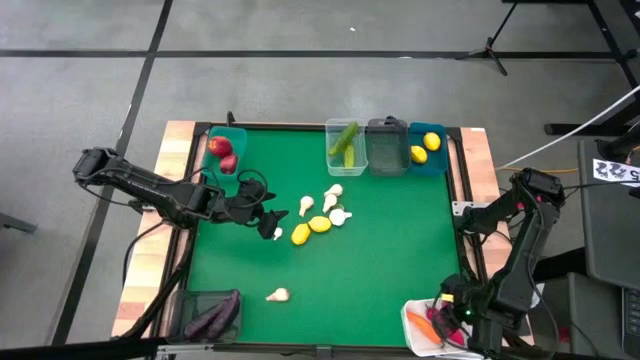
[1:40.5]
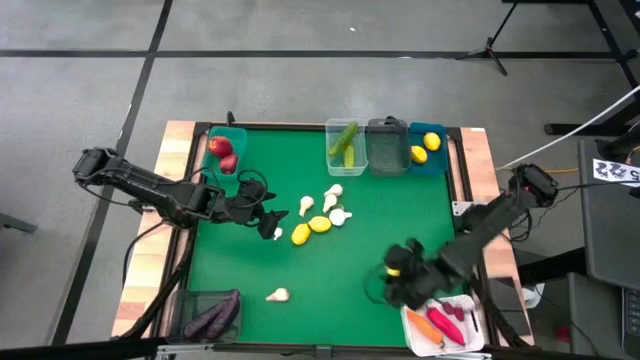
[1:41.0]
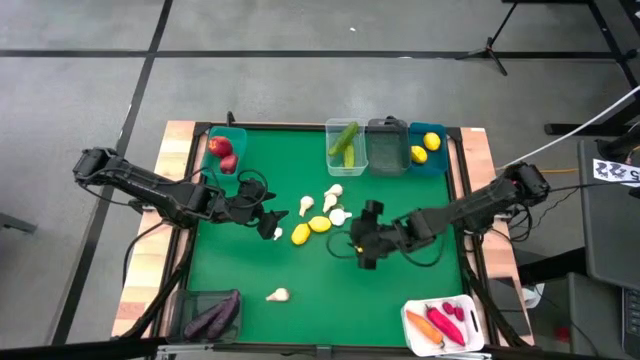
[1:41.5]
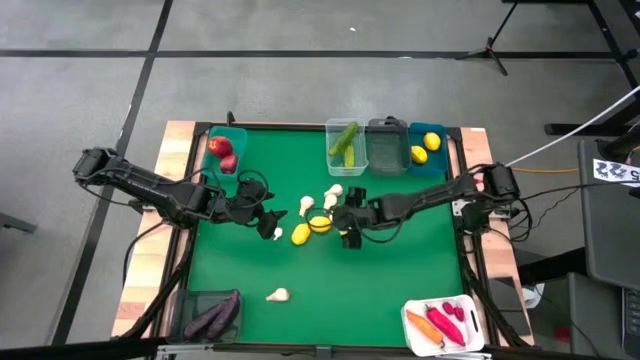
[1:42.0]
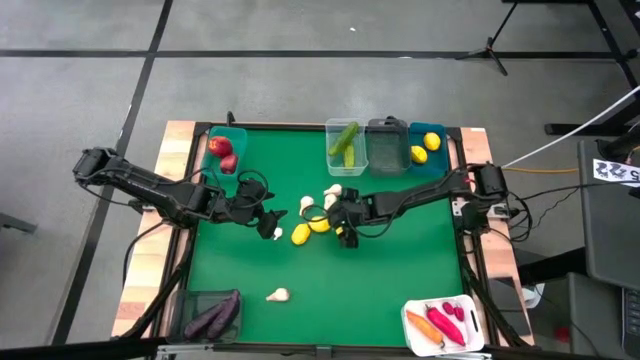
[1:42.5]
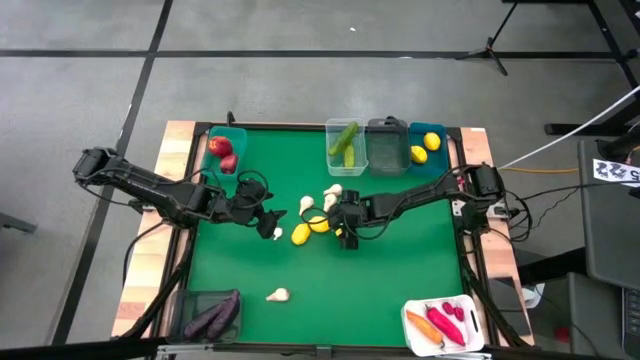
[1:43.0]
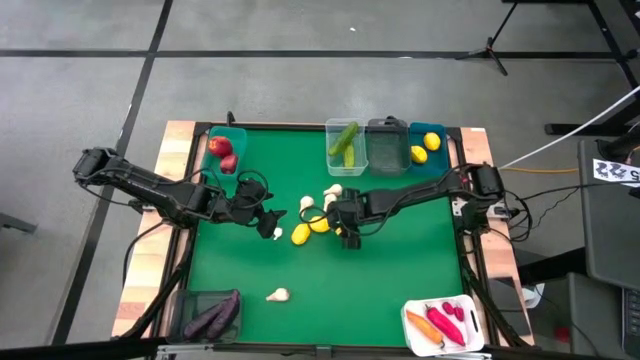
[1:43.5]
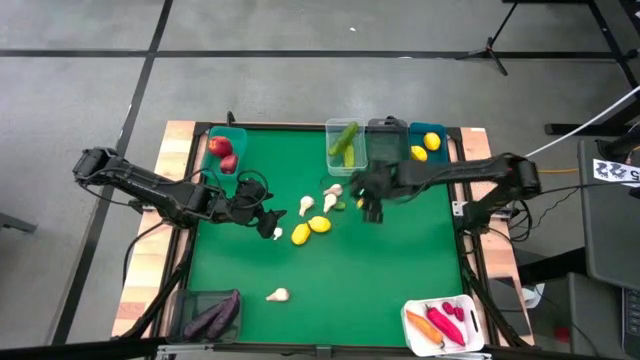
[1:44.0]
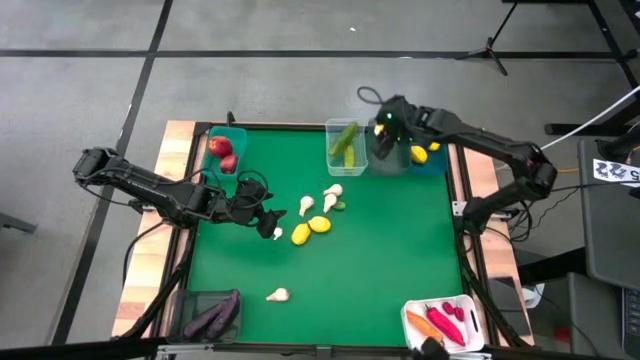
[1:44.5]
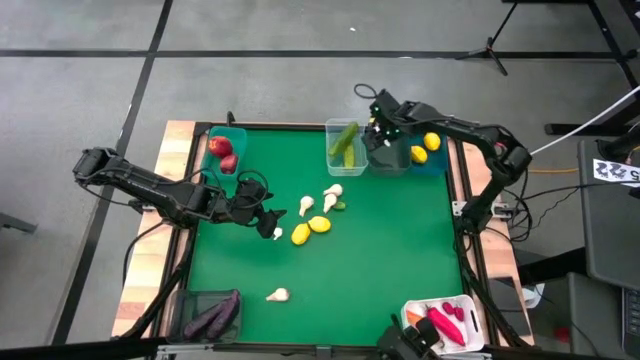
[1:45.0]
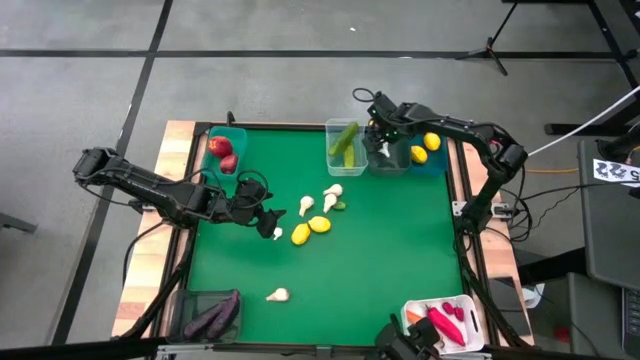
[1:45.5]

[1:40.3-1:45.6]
Task: Sort produce into baskets
Put the white garlic into the top black transparent bin

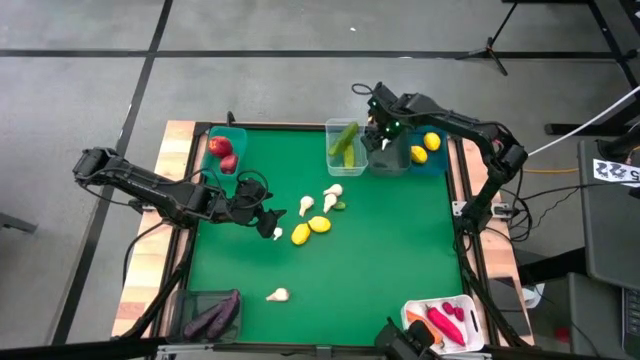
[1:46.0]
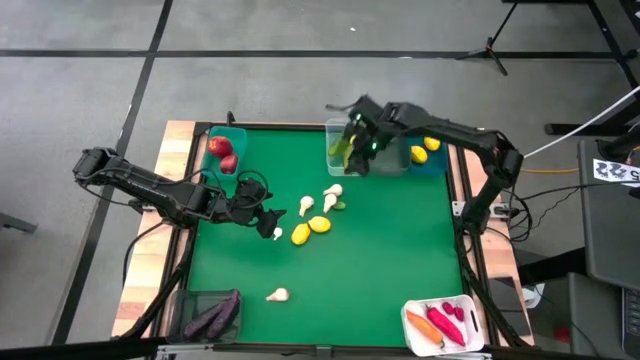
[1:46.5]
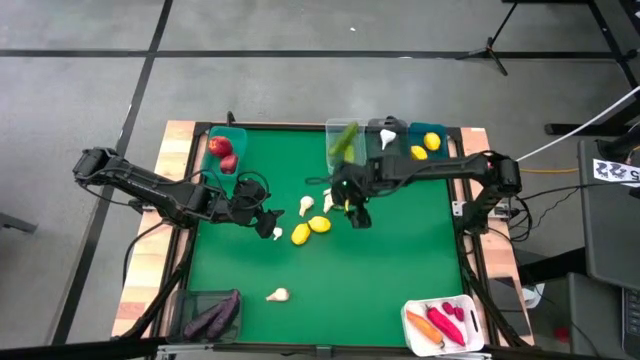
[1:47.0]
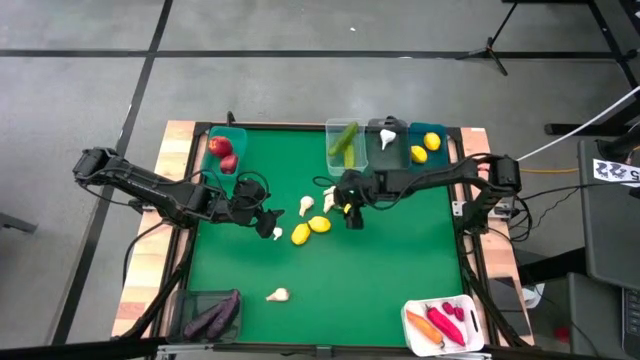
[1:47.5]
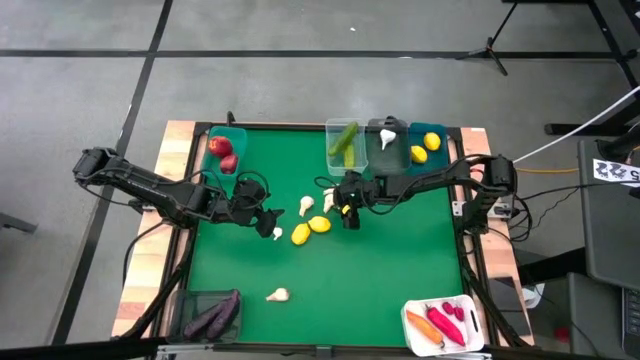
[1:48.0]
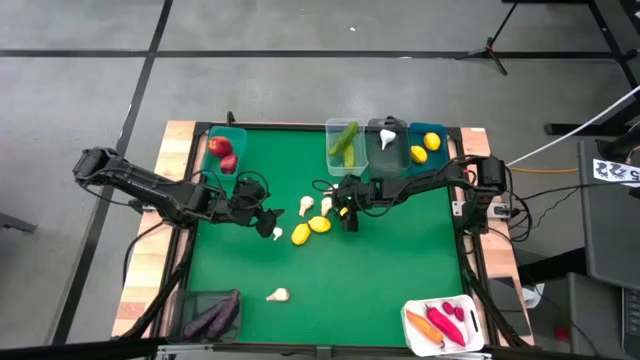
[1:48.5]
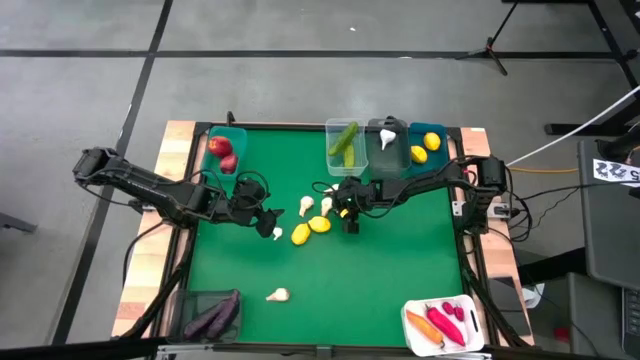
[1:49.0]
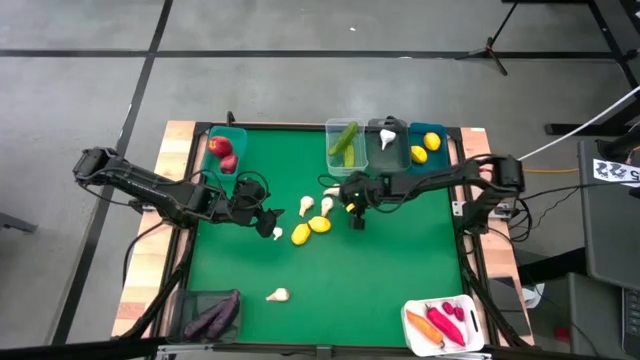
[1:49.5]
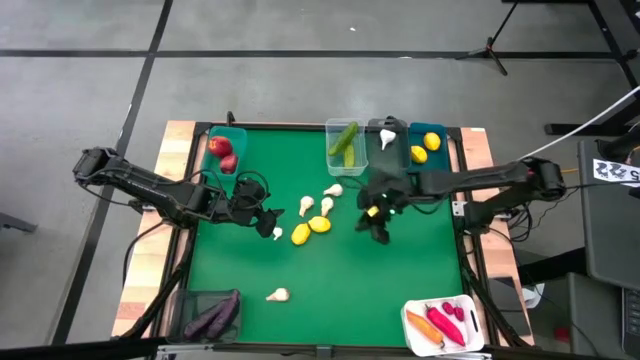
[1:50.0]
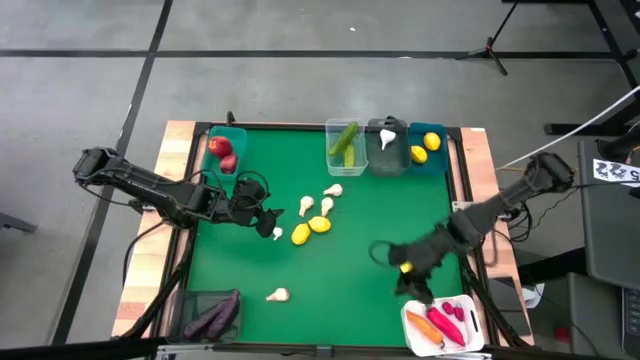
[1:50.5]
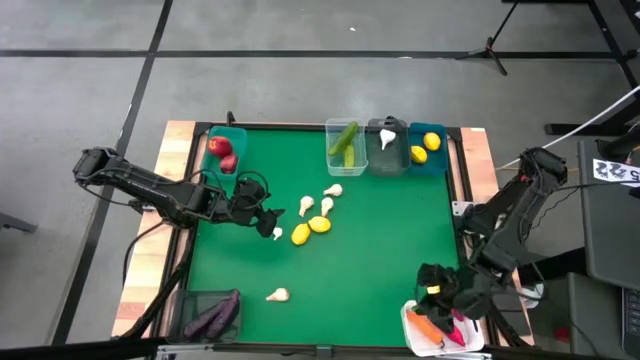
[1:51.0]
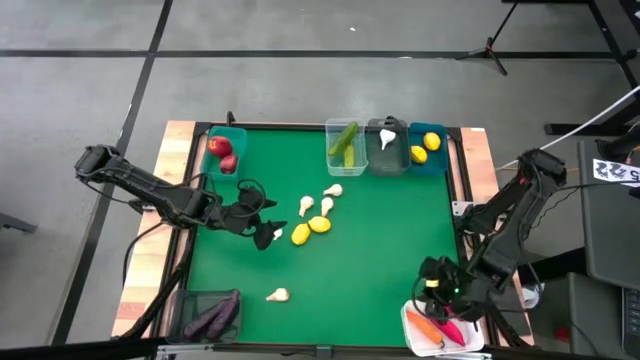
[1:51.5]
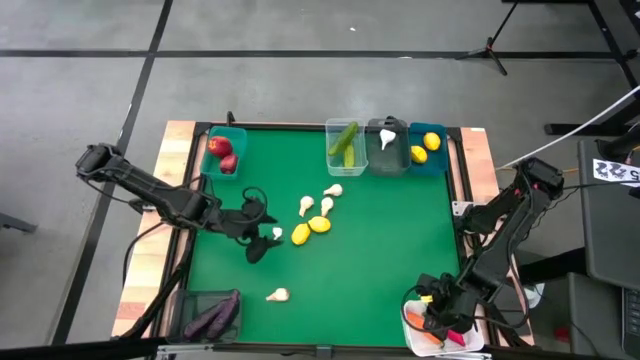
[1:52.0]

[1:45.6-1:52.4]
Put the green chili into the white bin

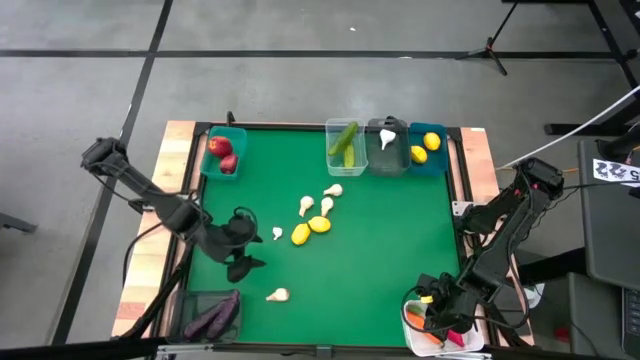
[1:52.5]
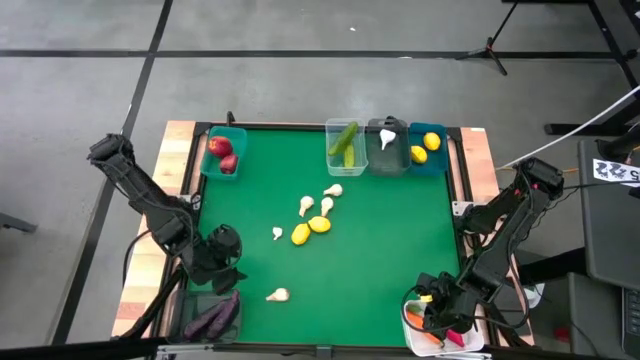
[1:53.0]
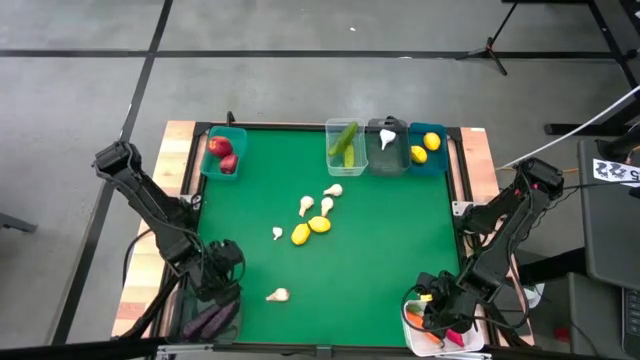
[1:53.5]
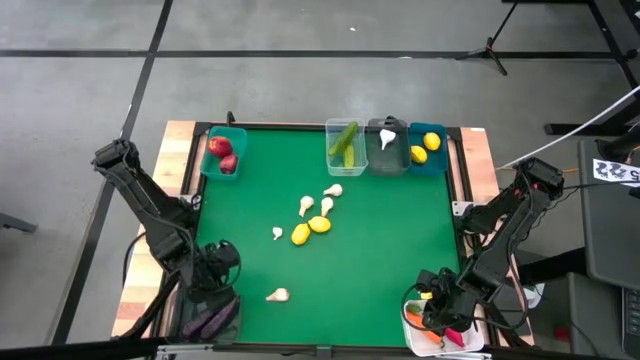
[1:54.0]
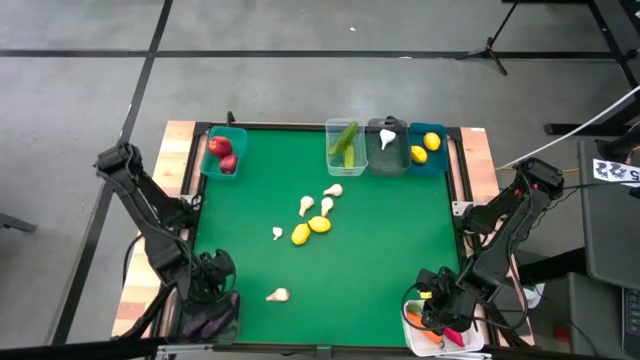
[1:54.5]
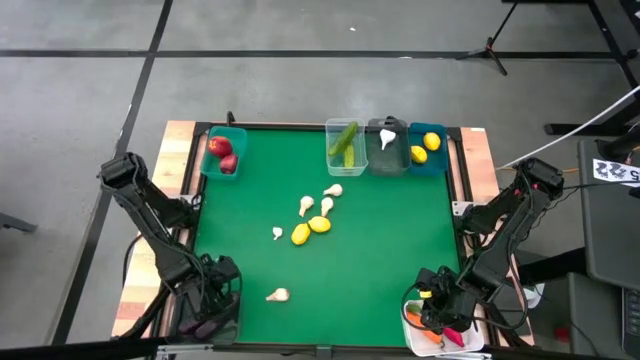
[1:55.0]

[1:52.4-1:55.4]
Adjust the eggplant

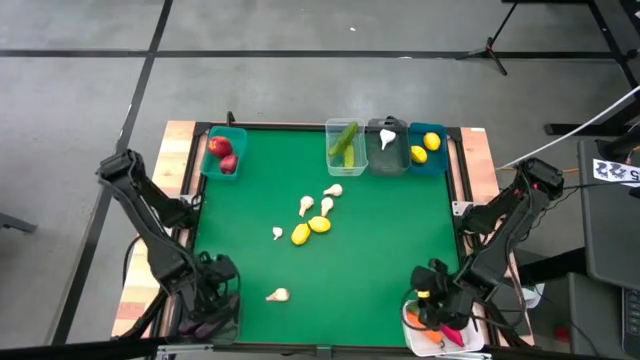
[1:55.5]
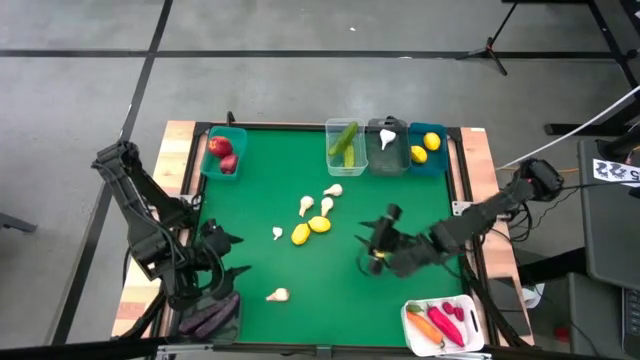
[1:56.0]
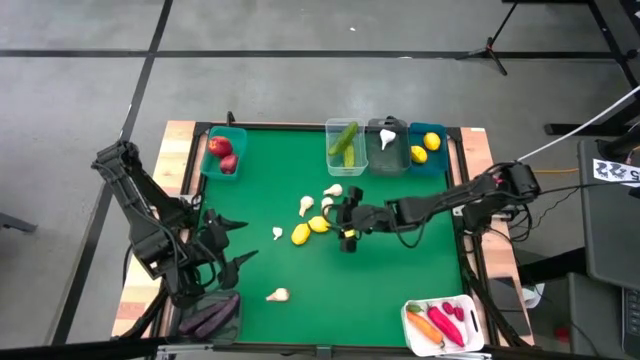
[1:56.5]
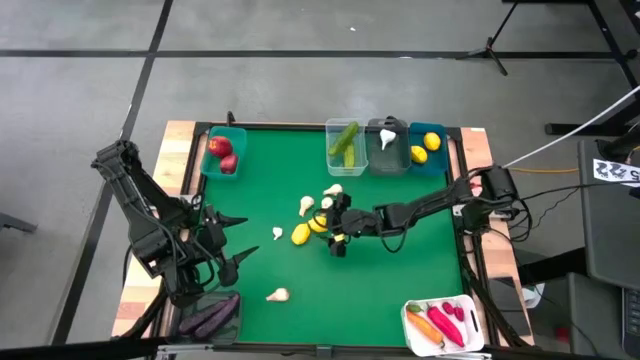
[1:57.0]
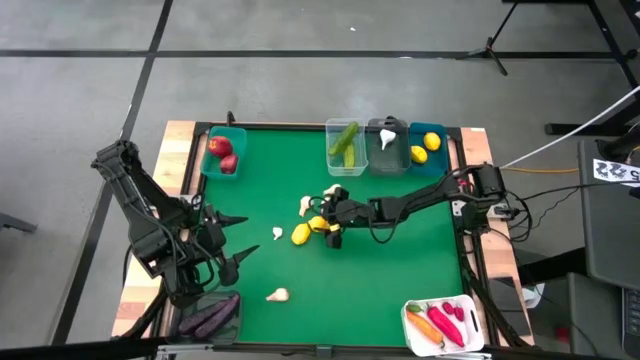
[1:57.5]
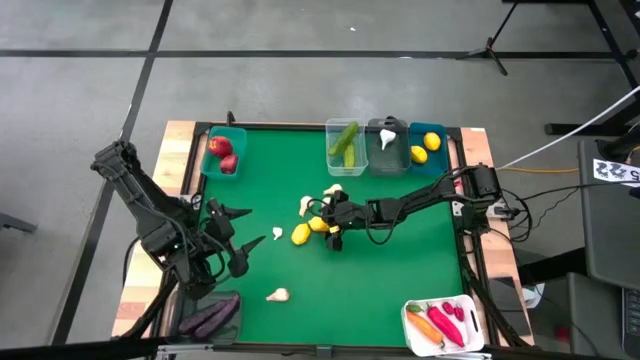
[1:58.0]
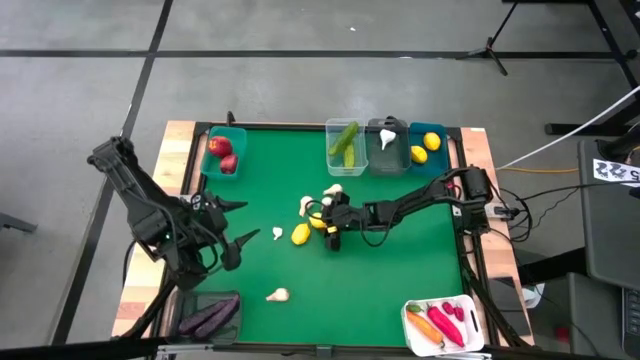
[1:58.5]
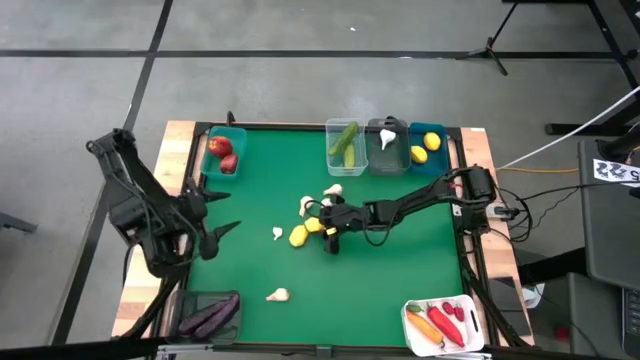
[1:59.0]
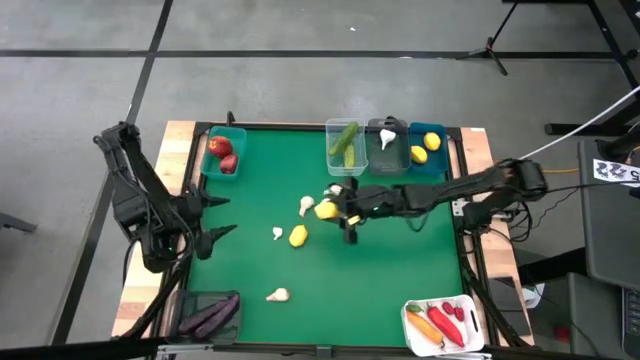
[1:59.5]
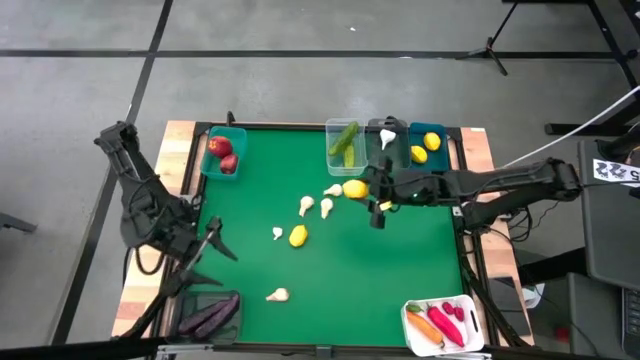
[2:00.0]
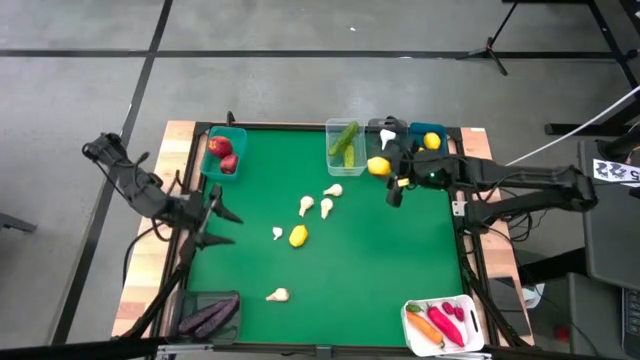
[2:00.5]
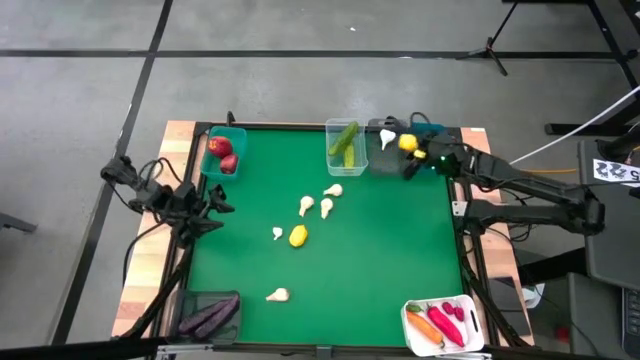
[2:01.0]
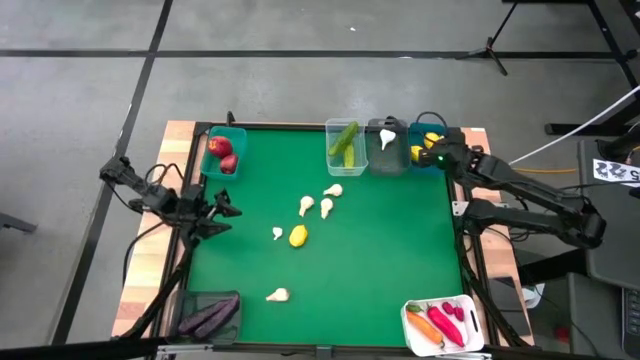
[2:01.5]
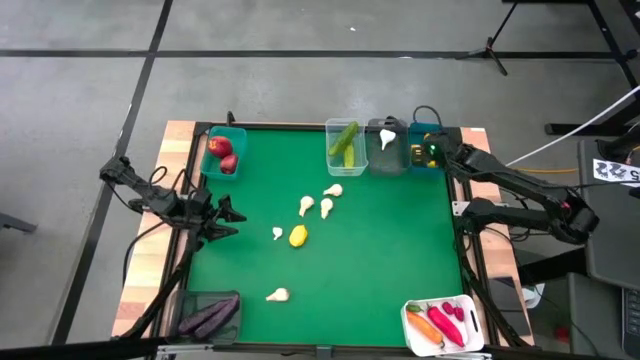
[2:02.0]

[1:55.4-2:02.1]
Put the yellow lemon into the blue bin
